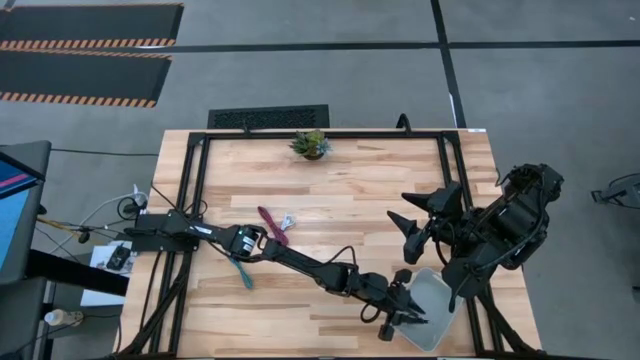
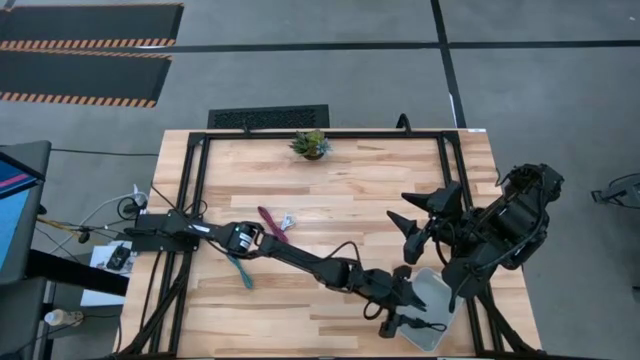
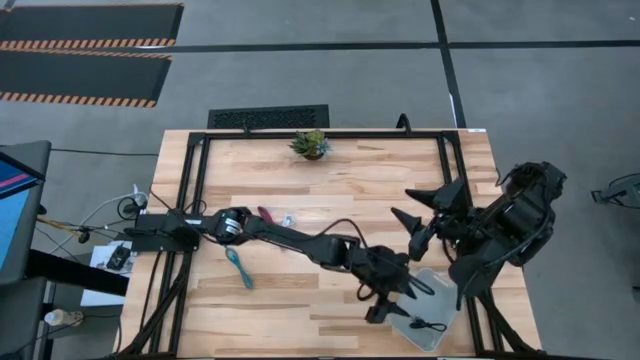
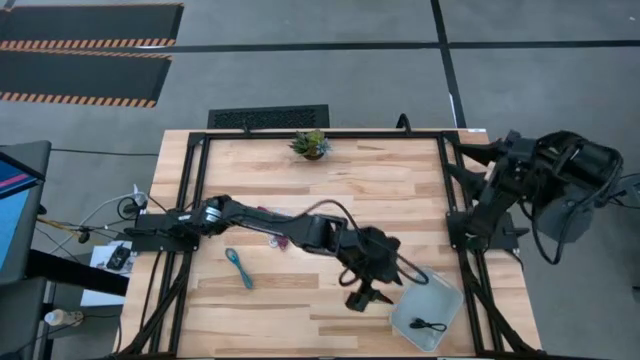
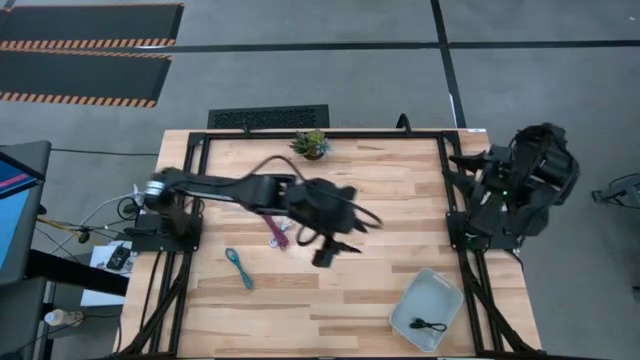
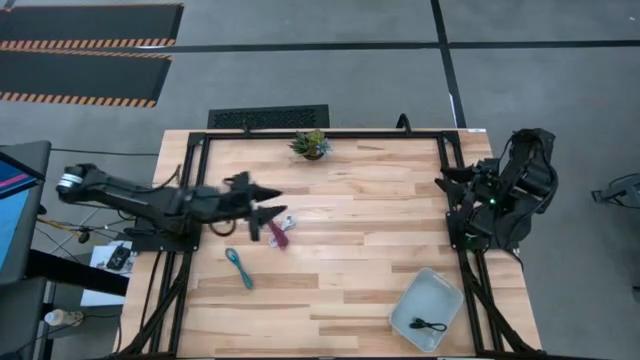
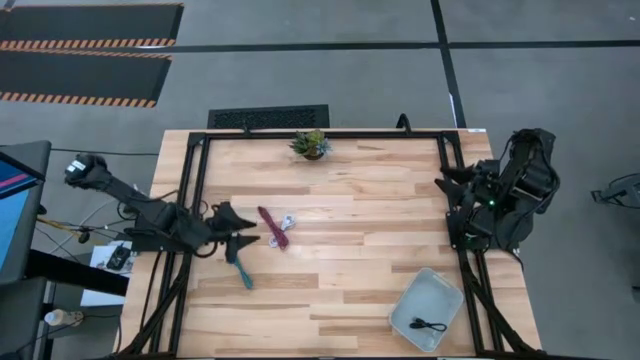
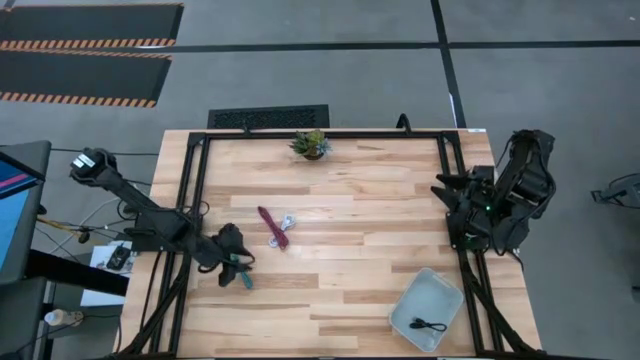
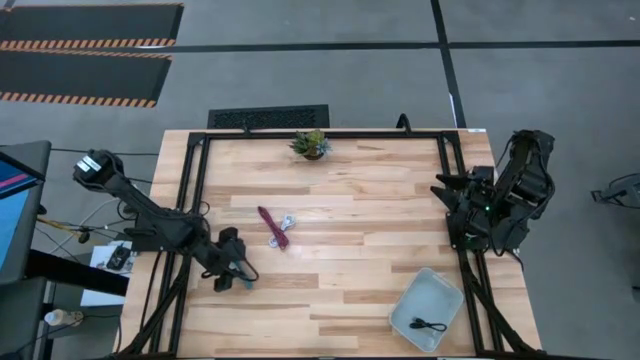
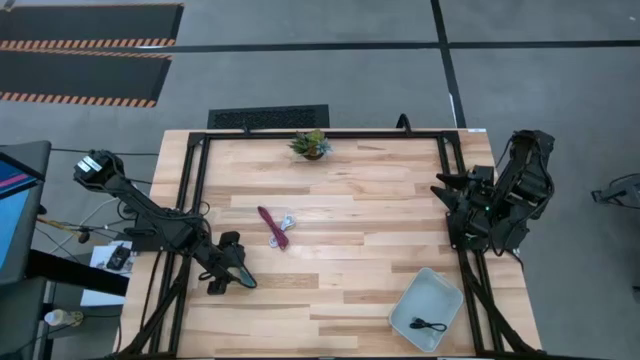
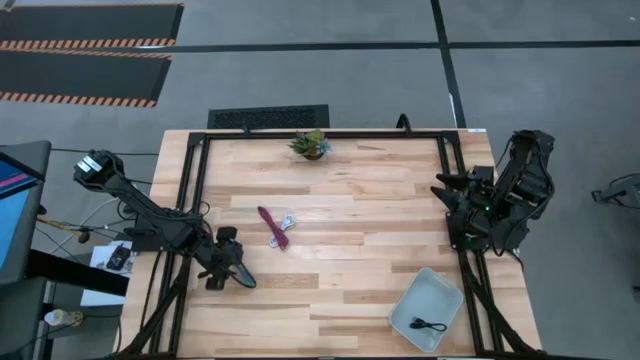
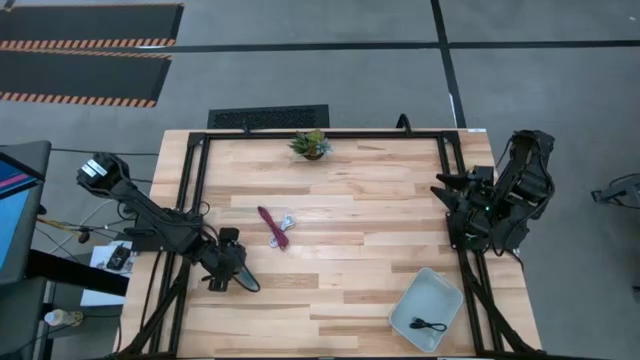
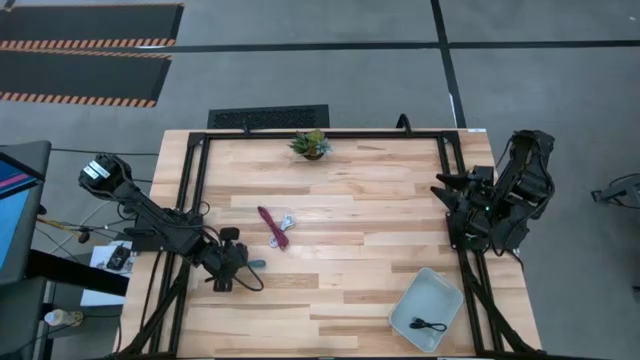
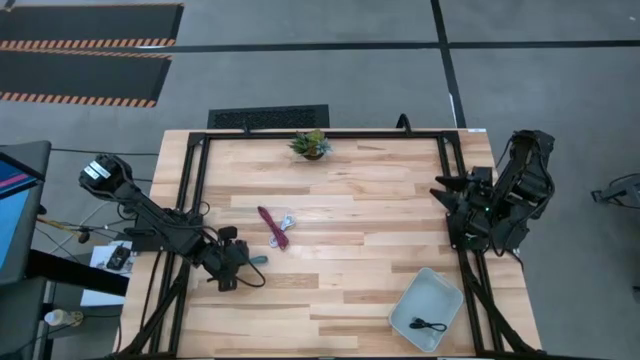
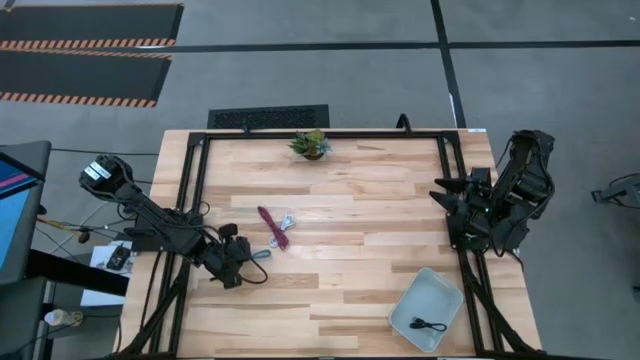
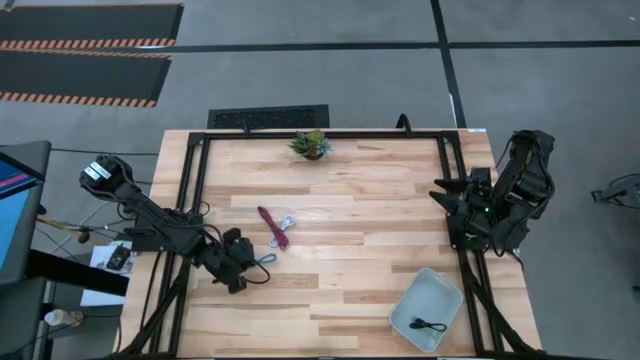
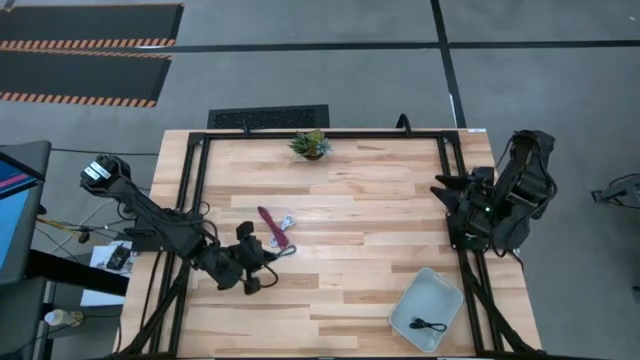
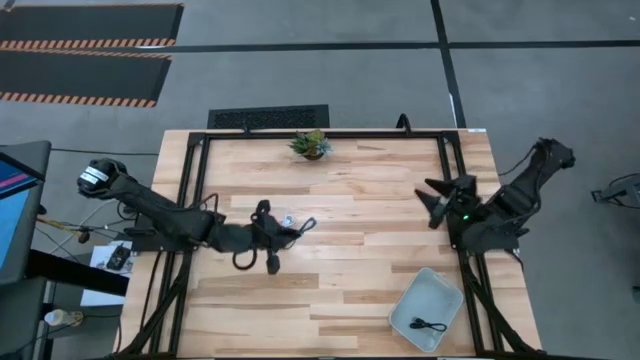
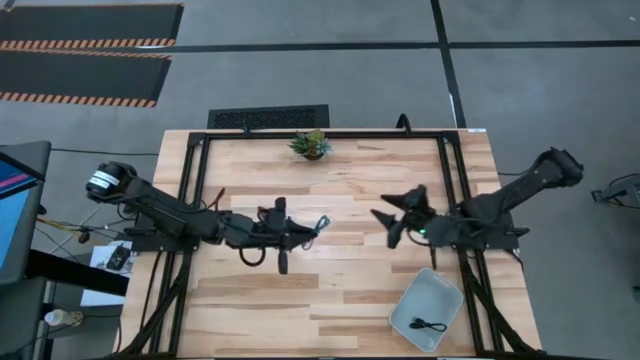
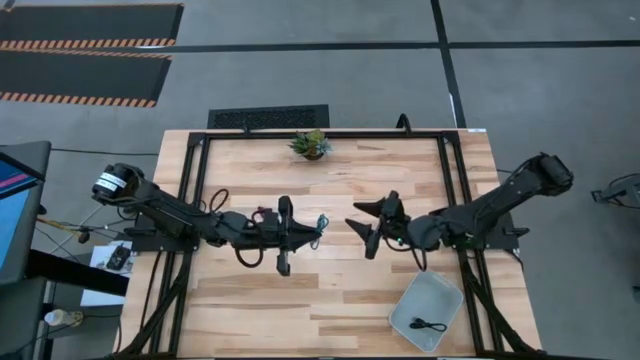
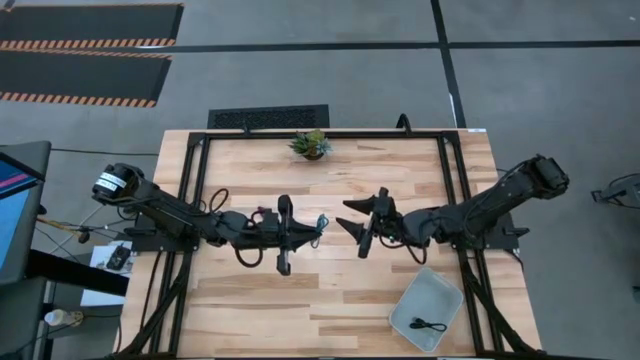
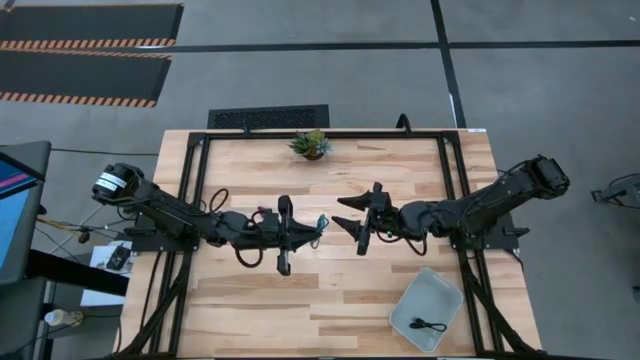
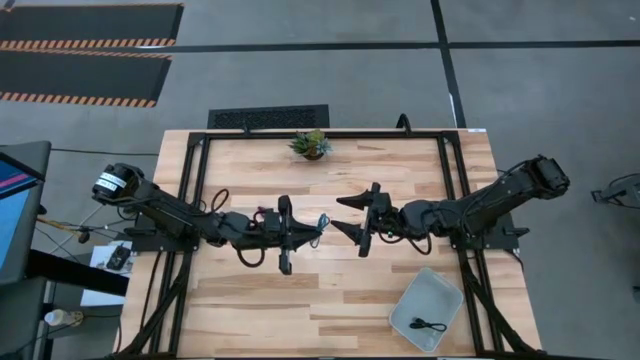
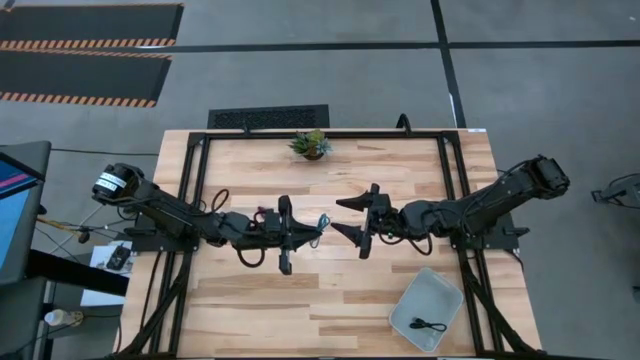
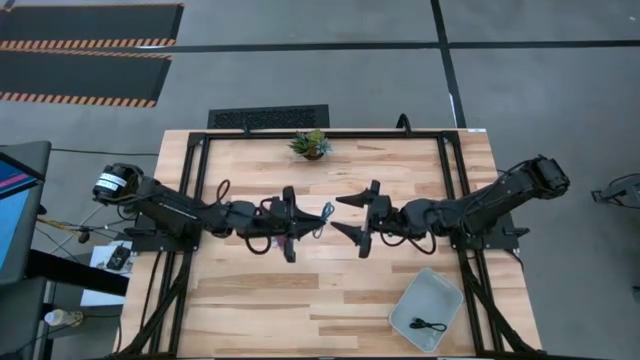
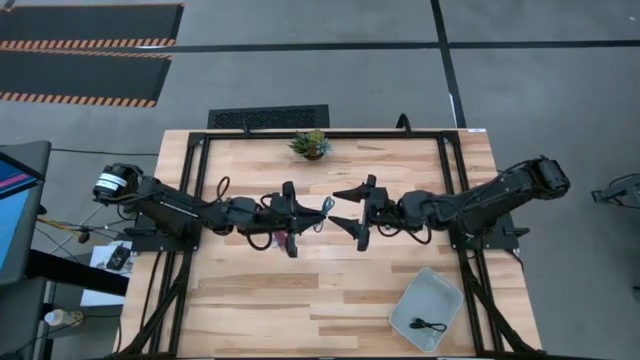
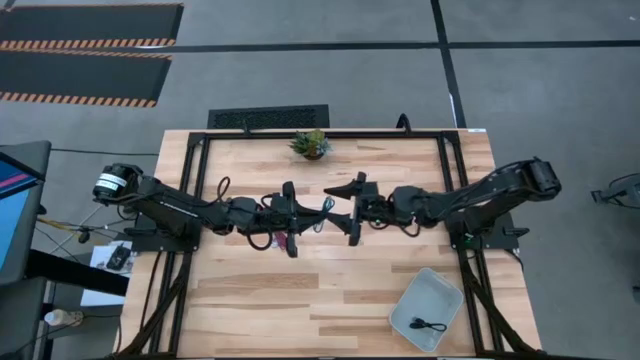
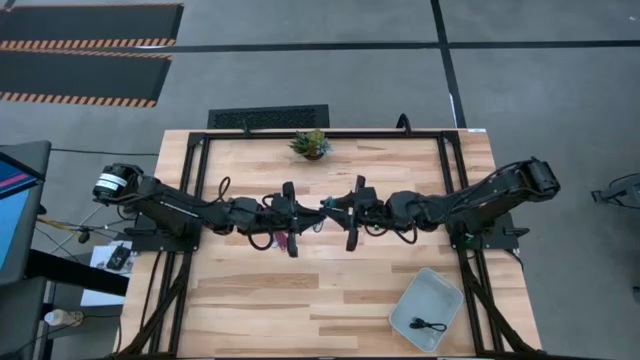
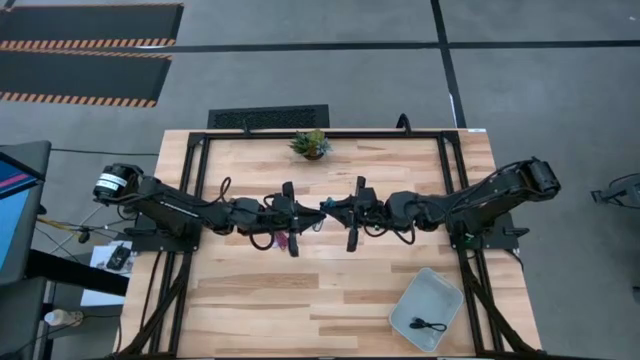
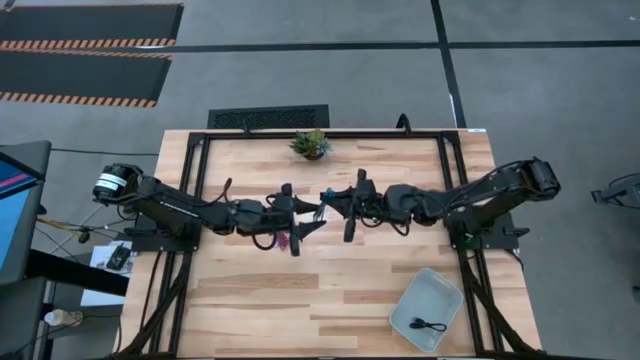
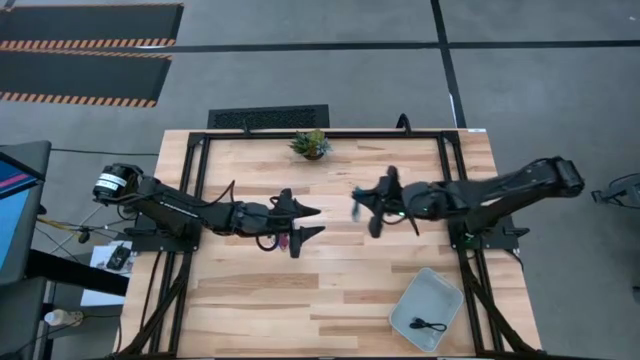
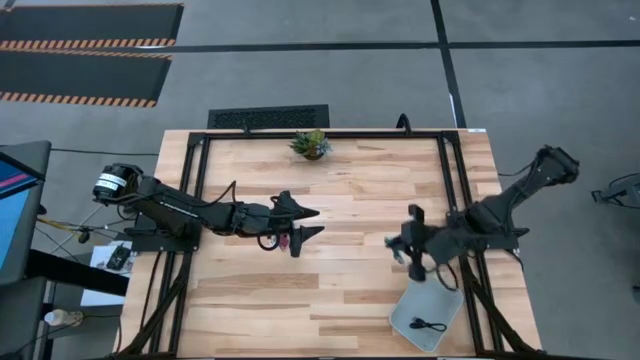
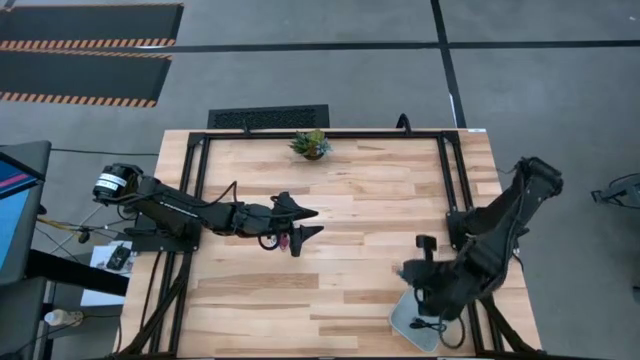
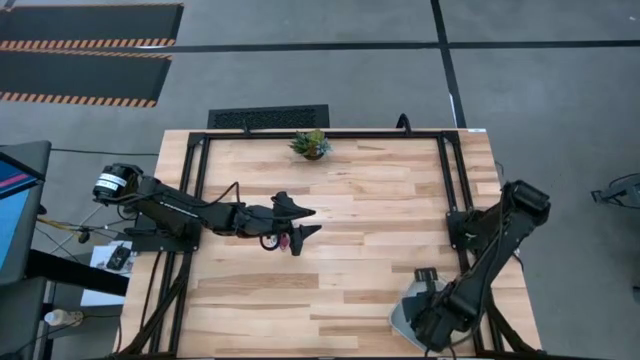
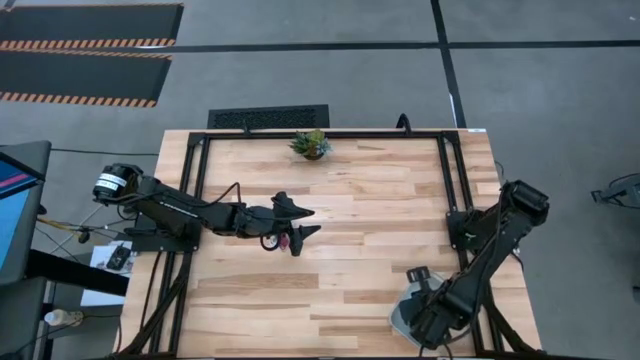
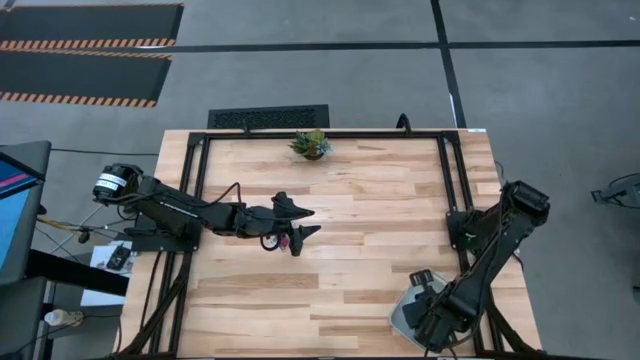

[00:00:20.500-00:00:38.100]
Task: Pick and place USB-C Cables
Put the blue charger cable into the white bin

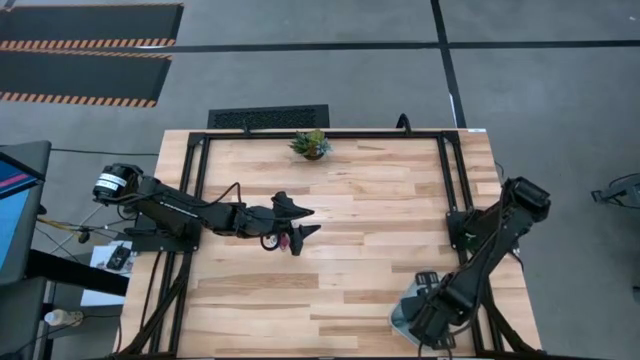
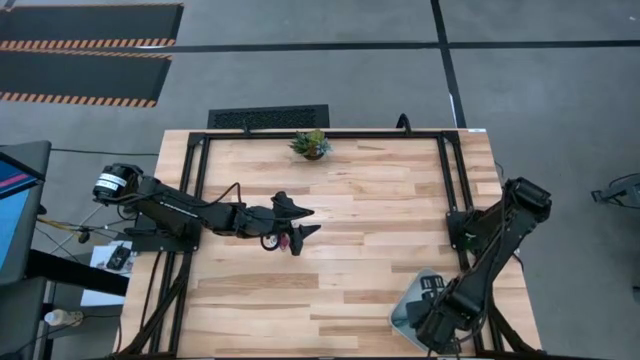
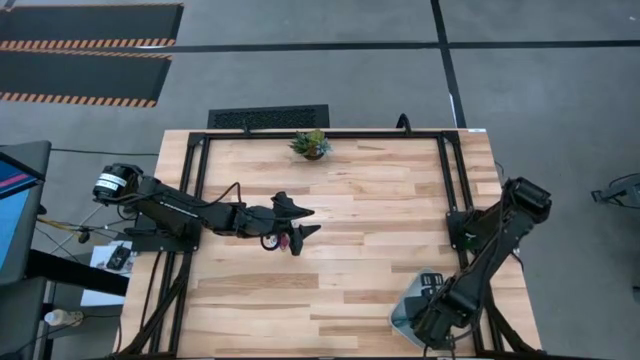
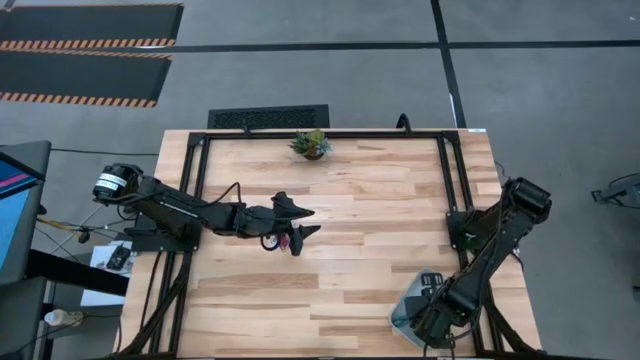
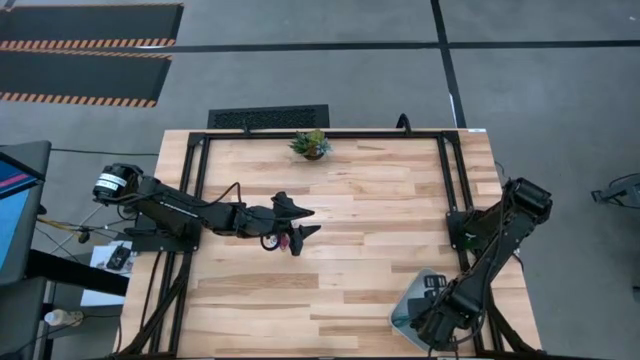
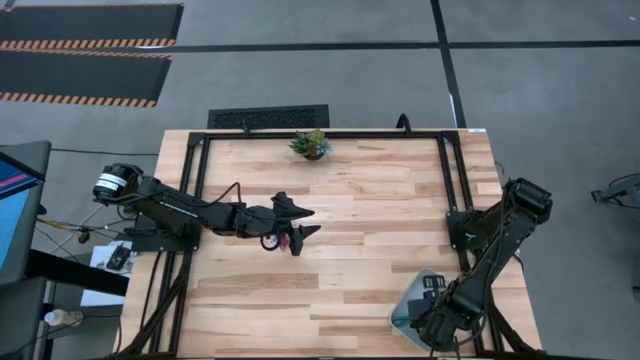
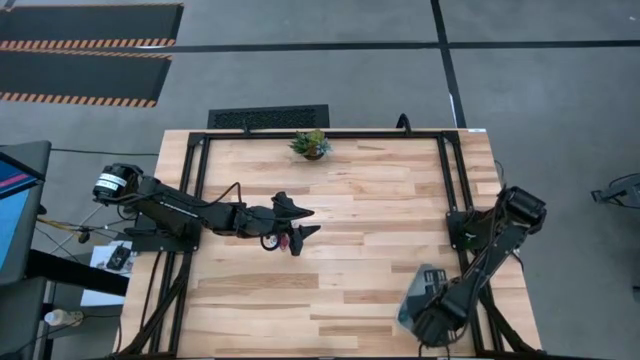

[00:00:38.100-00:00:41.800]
Adjust the black charger cable in the white bin
